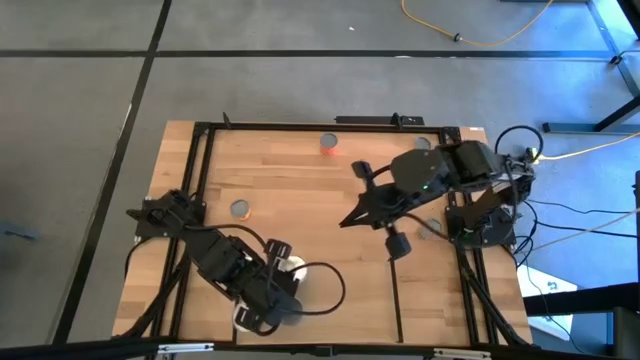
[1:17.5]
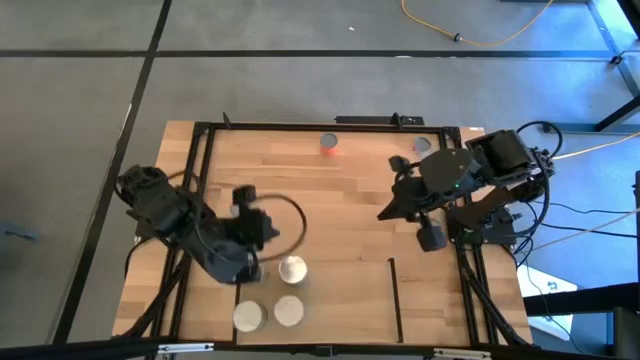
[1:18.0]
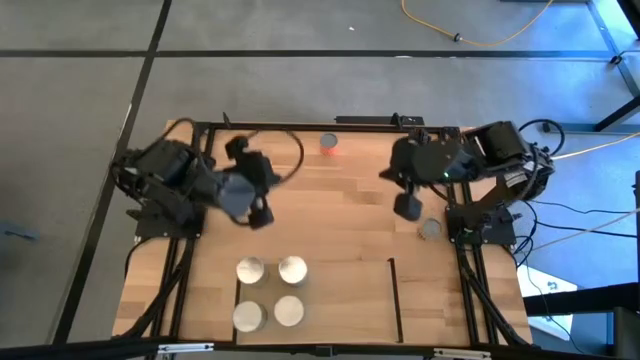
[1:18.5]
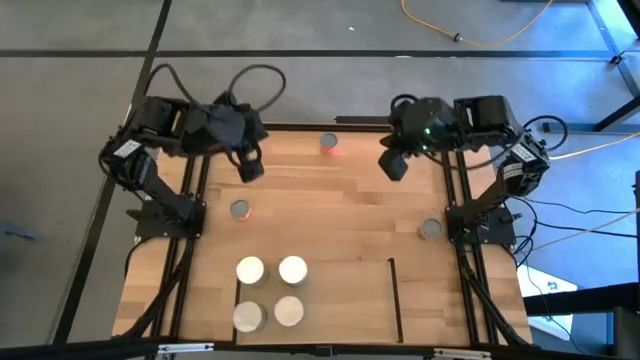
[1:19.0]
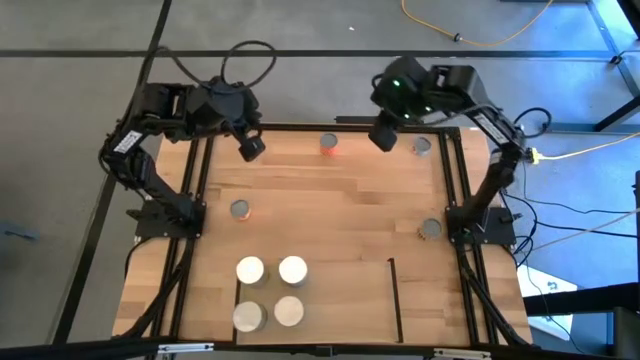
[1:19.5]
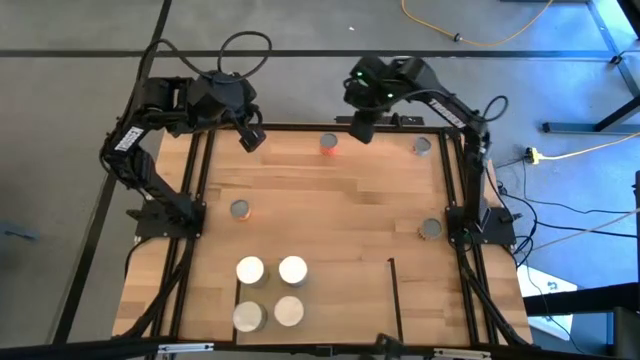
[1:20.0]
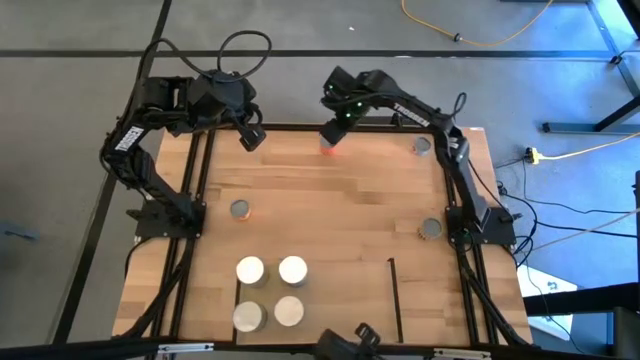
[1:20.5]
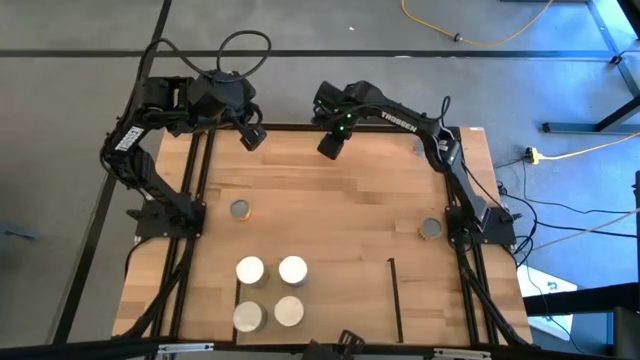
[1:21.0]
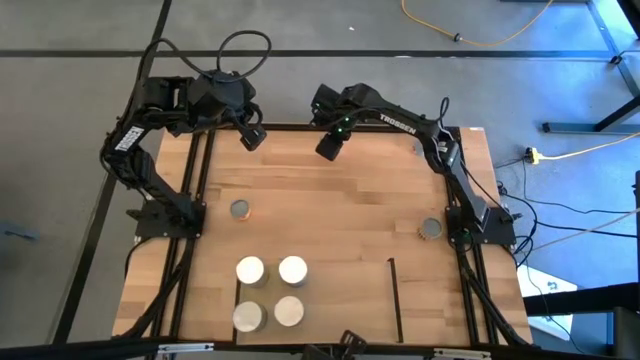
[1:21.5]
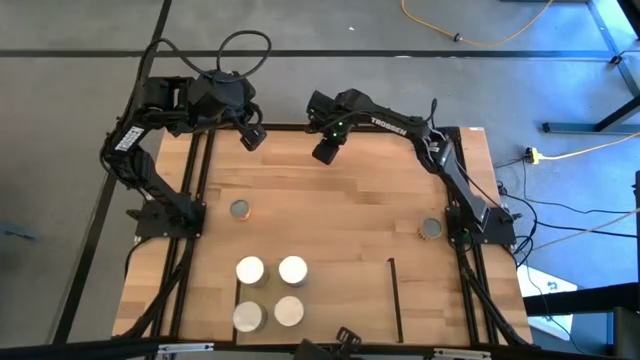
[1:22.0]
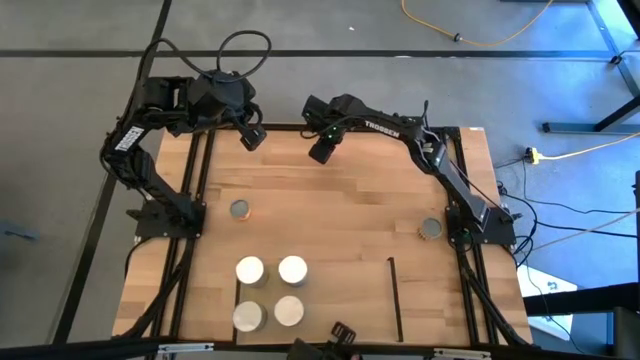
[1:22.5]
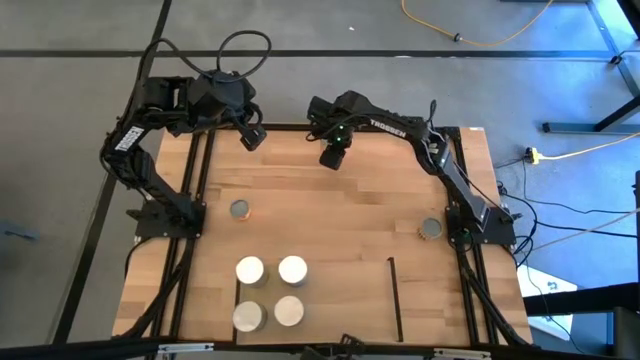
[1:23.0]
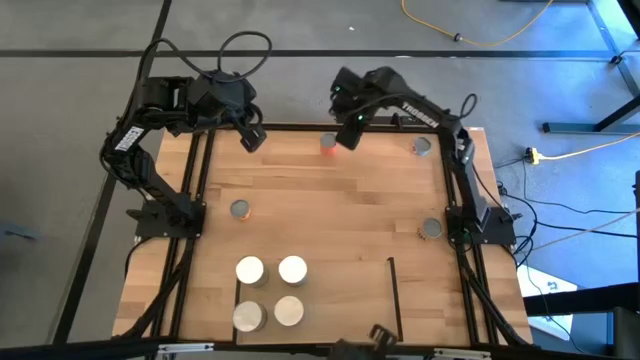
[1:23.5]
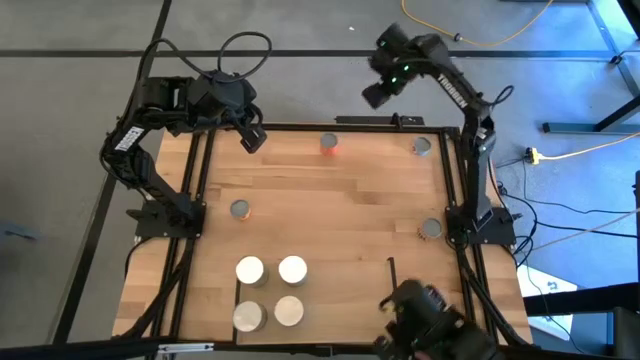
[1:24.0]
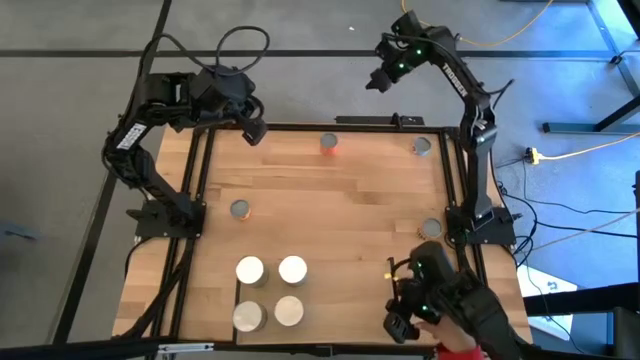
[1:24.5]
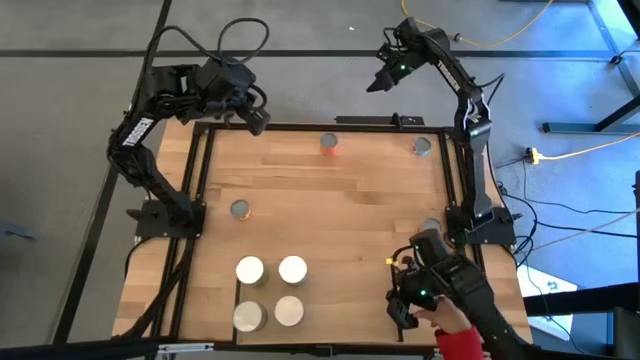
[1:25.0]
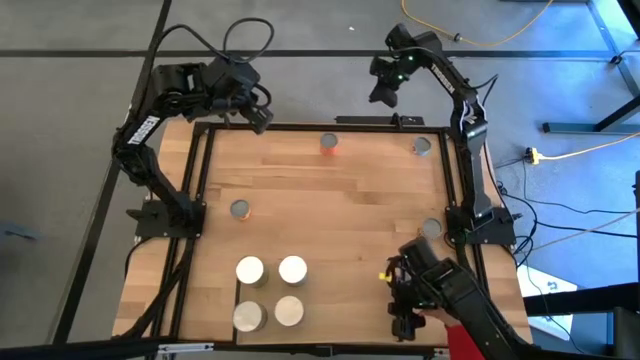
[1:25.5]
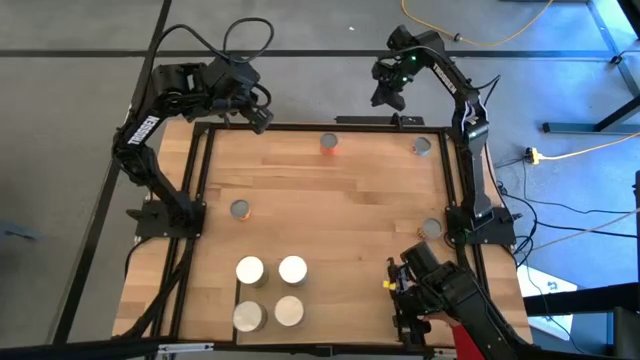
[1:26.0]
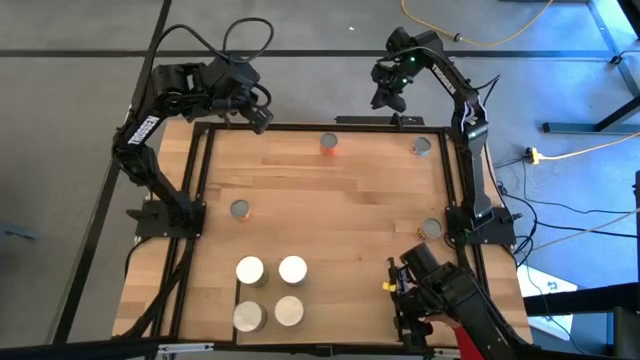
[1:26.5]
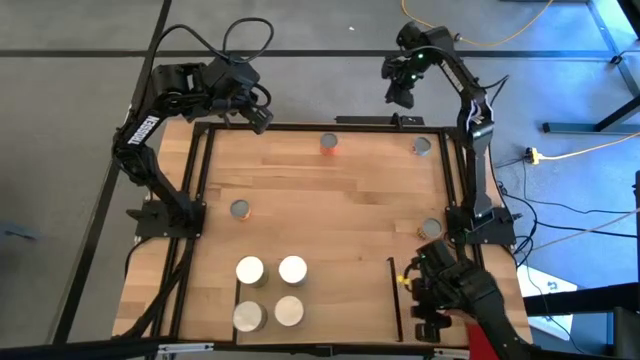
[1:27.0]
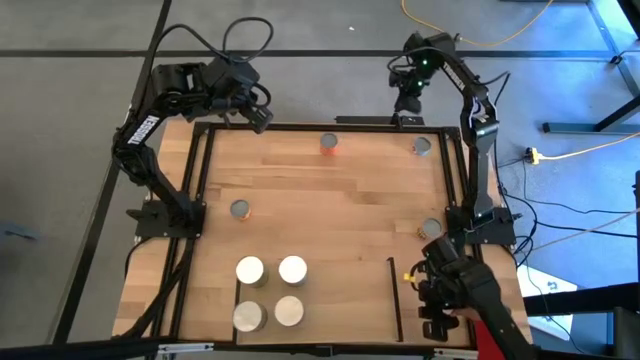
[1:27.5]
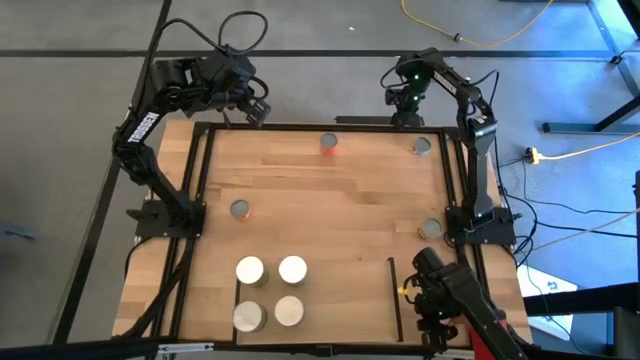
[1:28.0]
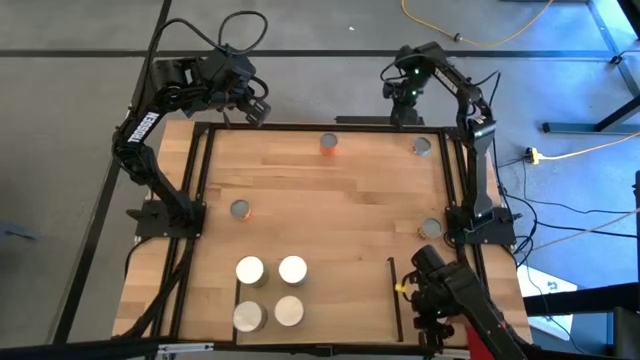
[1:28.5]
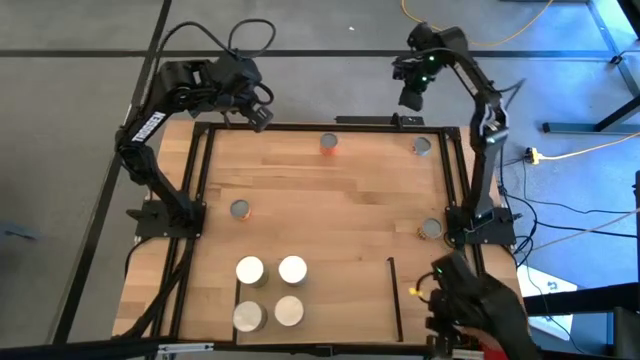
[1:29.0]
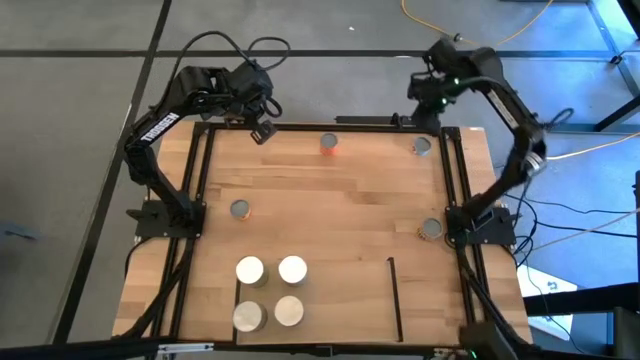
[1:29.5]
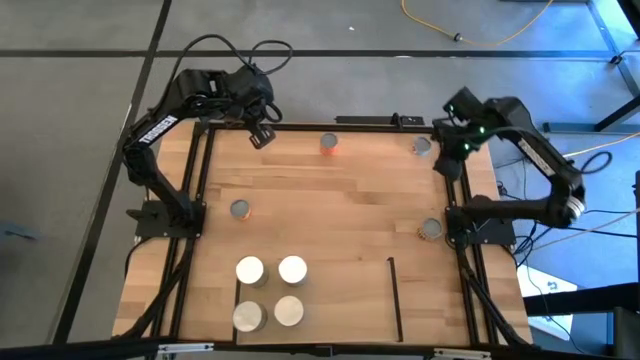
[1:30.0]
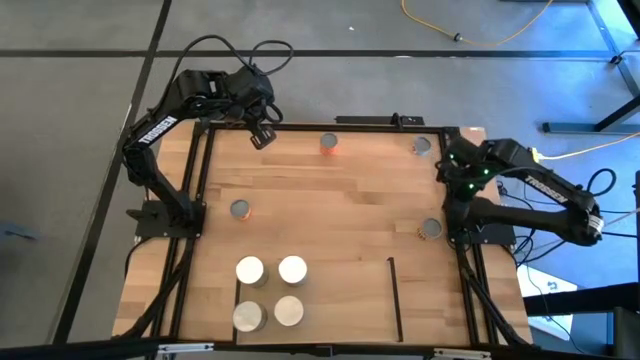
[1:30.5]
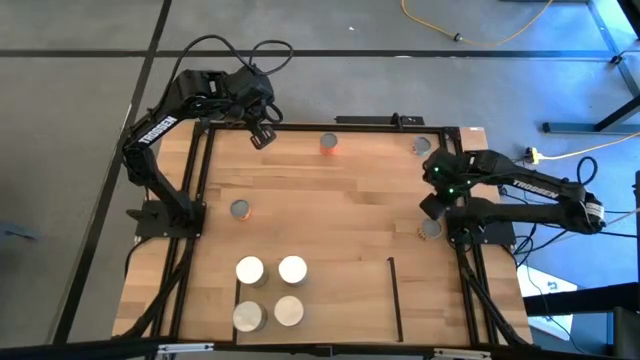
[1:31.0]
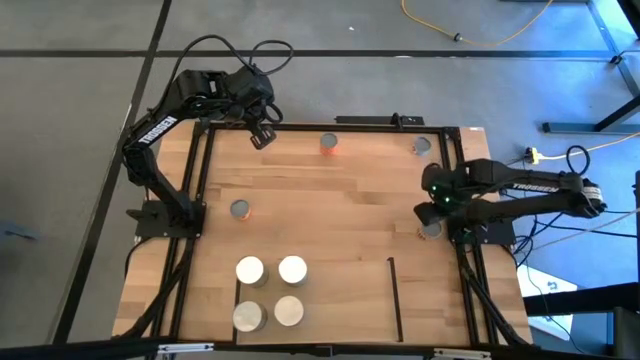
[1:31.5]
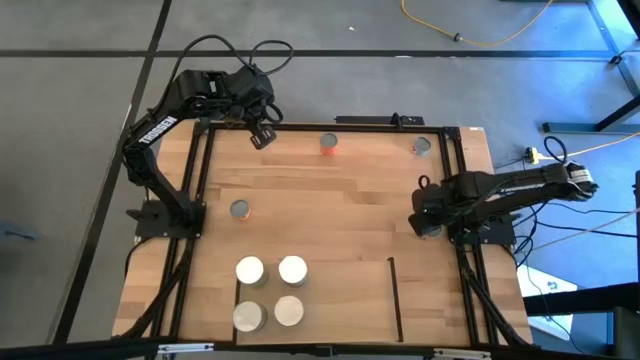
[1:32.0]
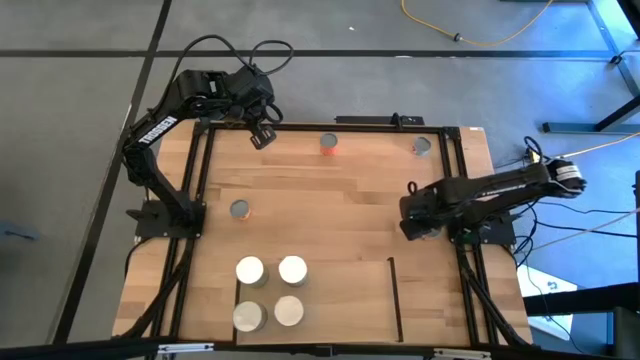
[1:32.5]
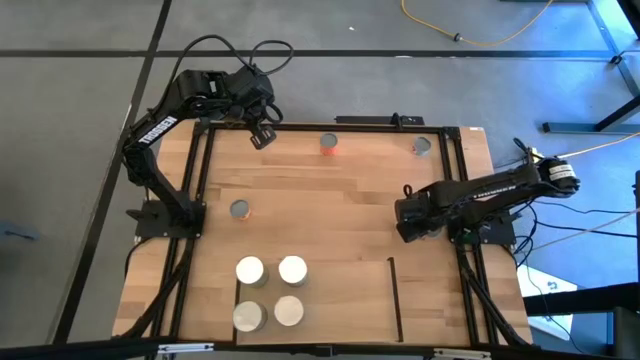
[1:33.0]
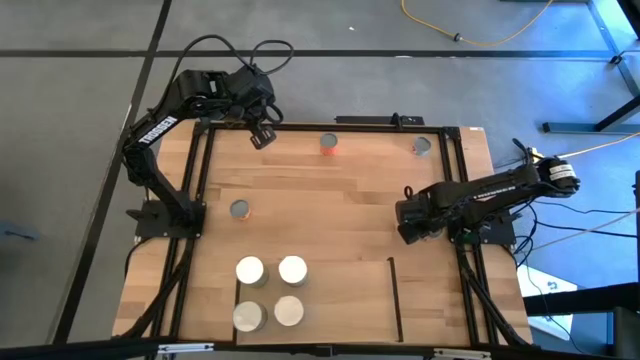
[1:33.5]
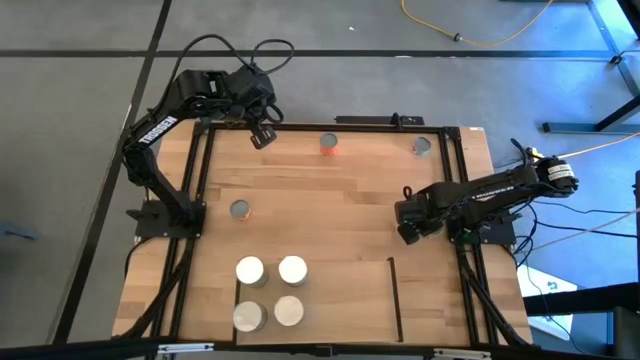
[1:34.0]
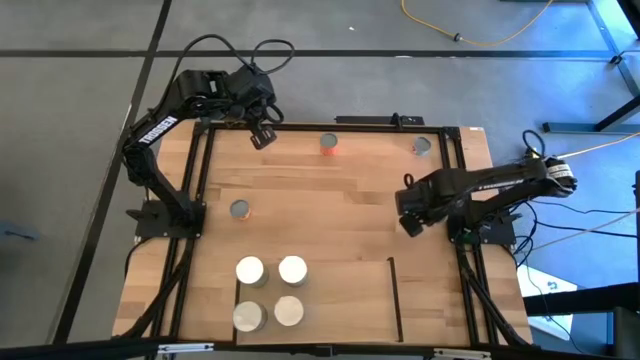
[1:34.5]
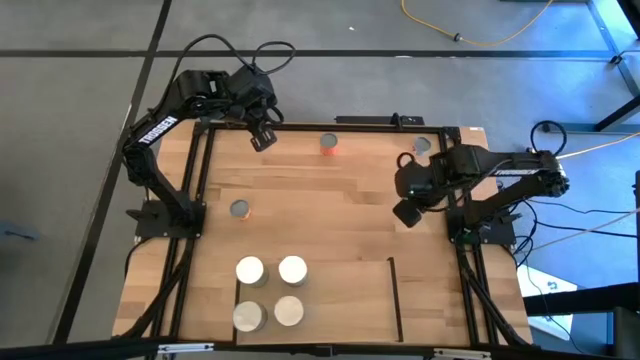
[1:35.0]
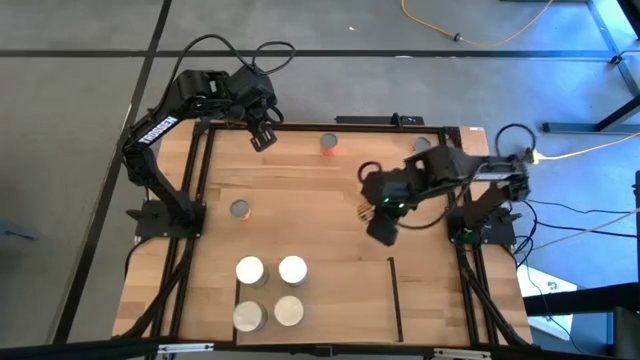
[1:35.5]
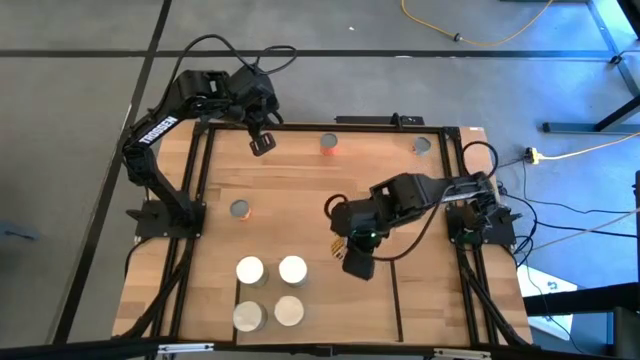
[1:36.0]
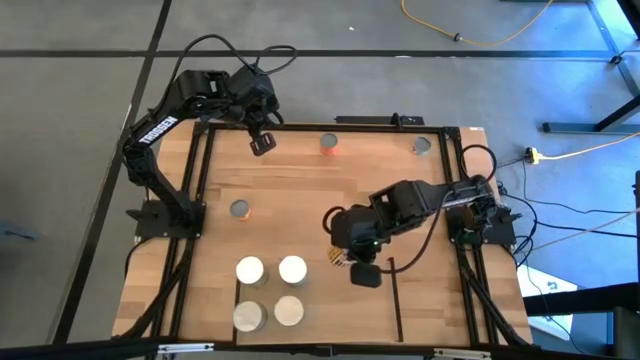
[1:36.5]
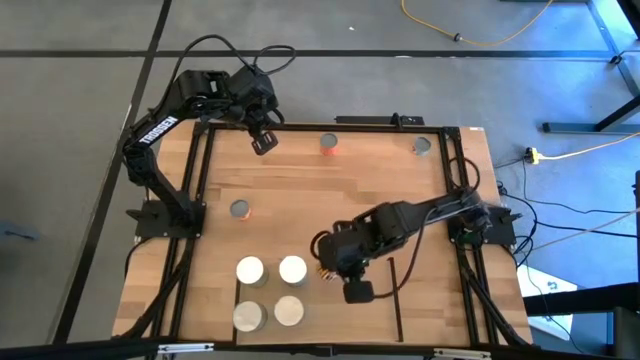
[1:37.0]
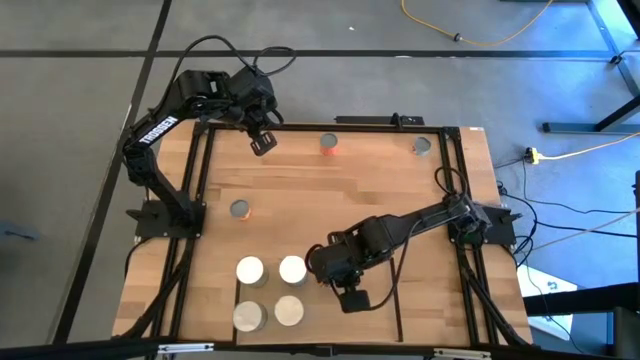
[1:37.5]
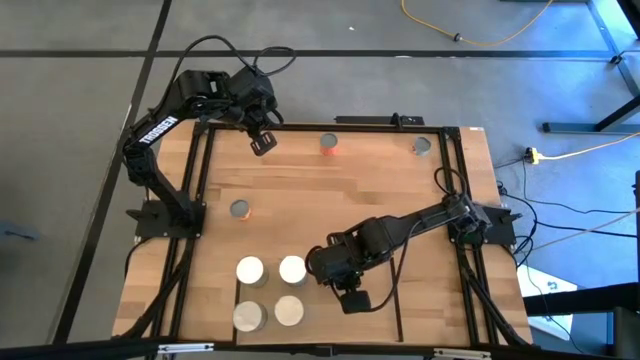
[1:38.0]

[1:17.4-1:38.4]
Task: Pick and place cans onto a shelf
Put the canned spicy black beans on the shelf

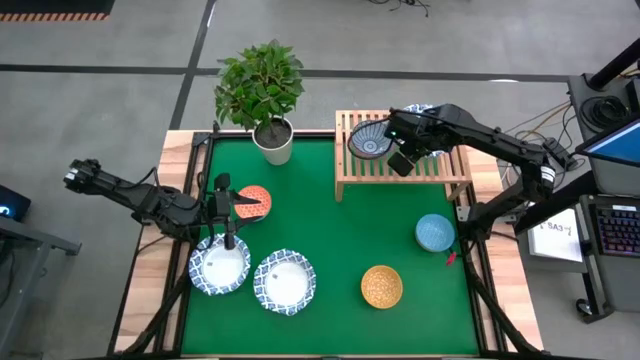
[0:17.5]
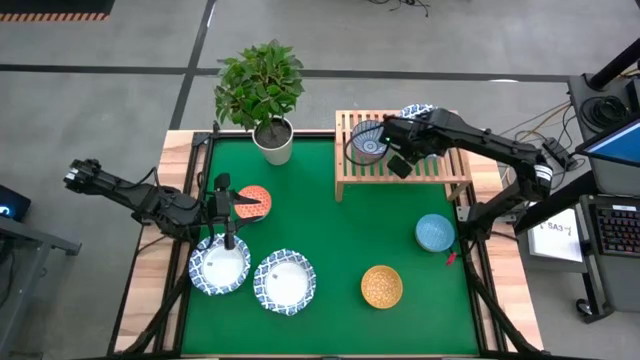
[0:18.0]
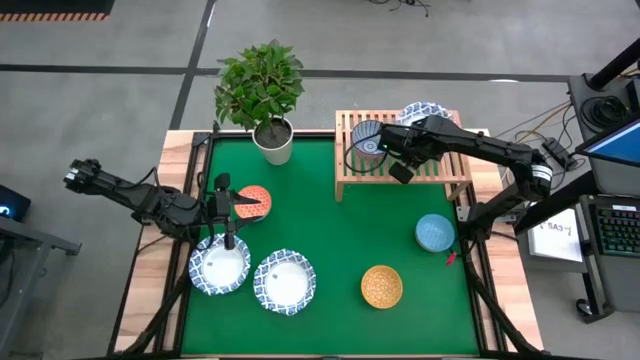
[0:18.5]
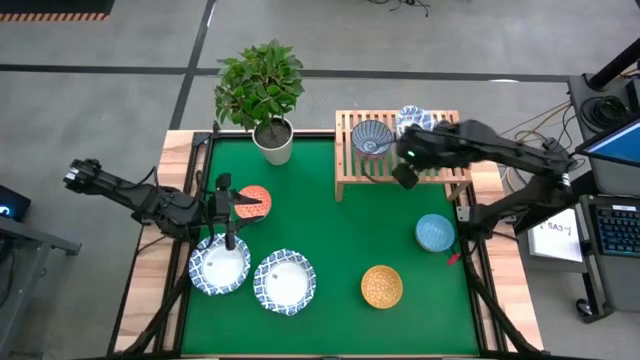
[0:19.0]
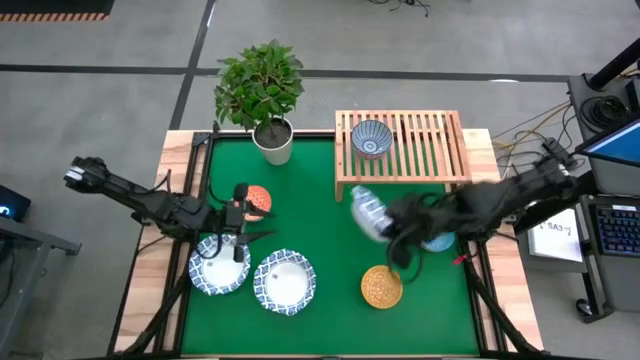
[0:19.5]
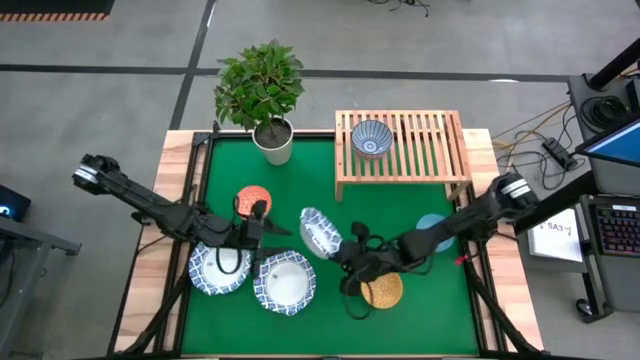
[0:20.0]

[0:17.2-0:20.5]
Task: Place and stack bowls onto a shelf
Put the white patterned bowl on the shelf
